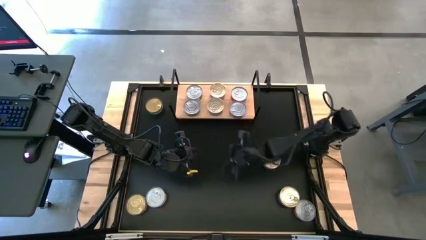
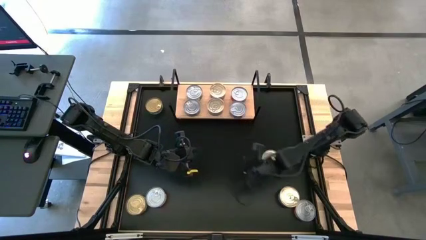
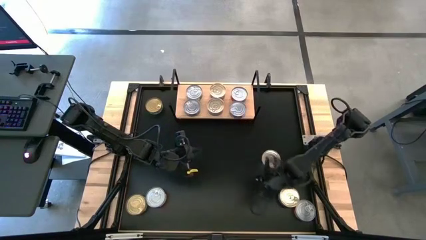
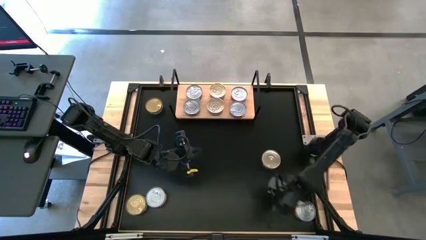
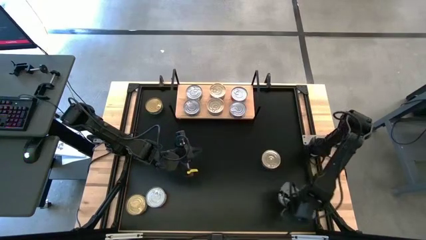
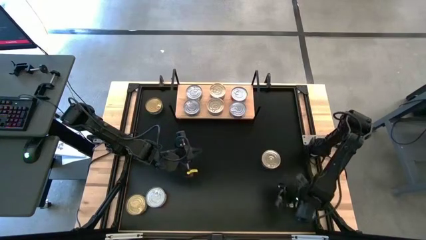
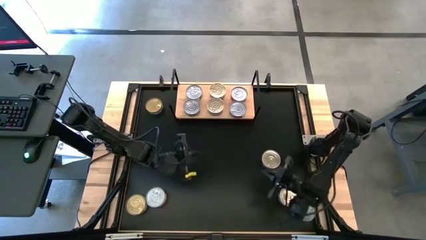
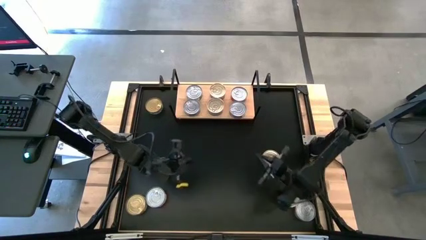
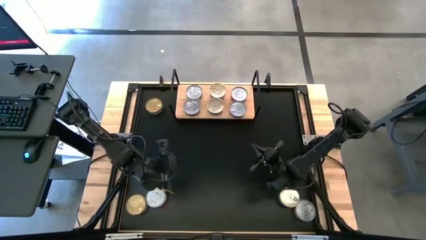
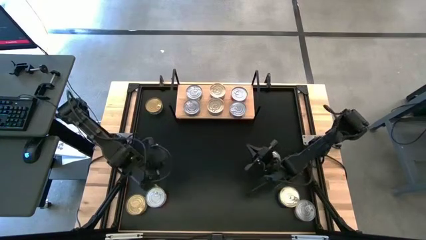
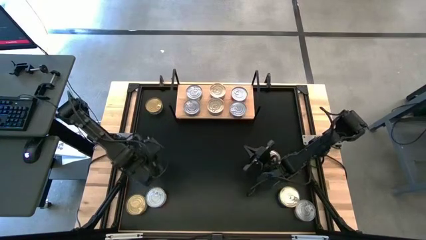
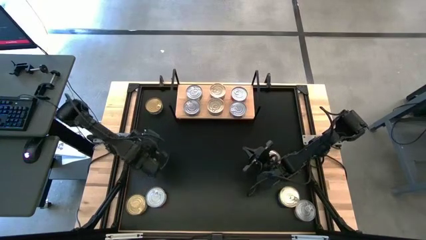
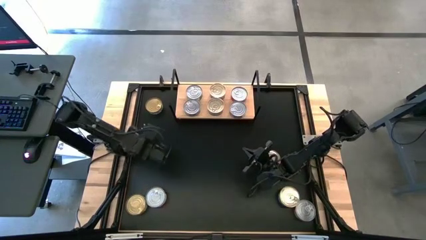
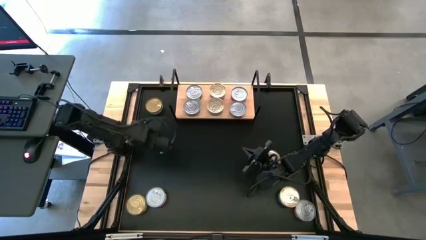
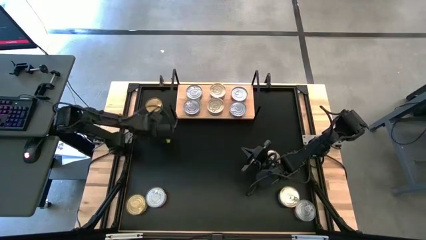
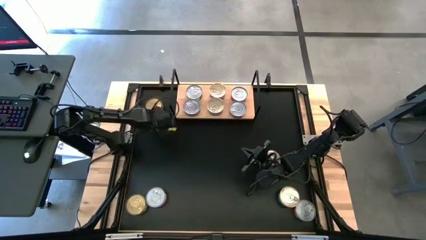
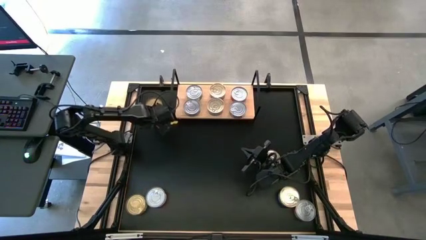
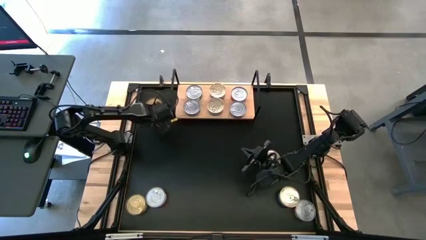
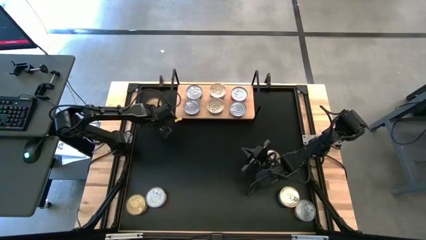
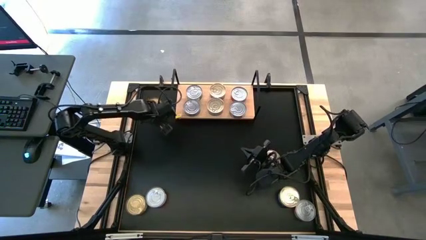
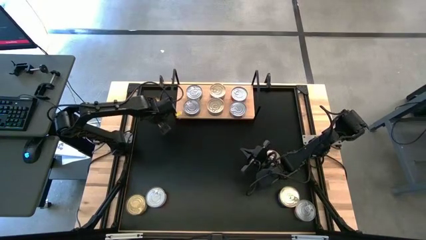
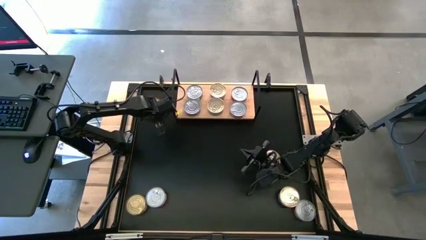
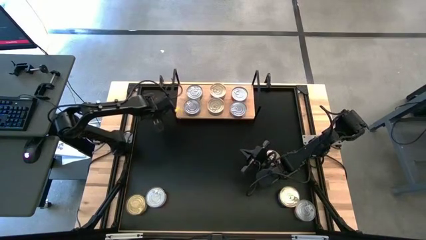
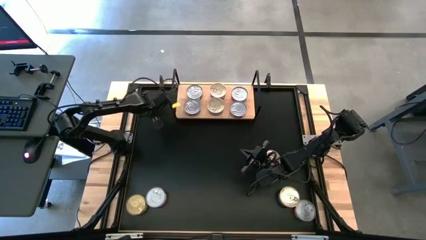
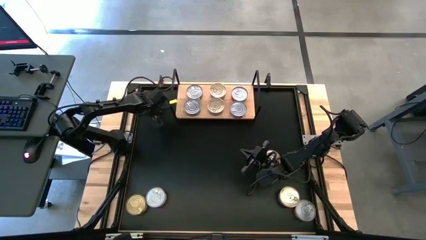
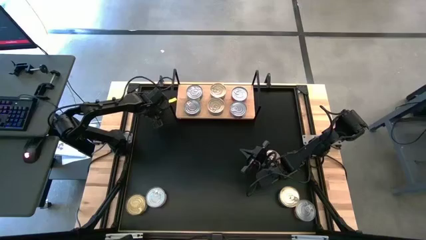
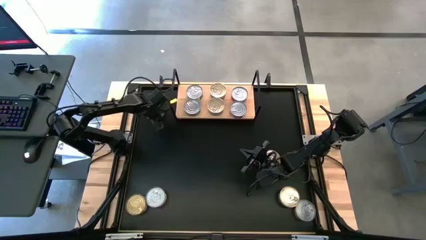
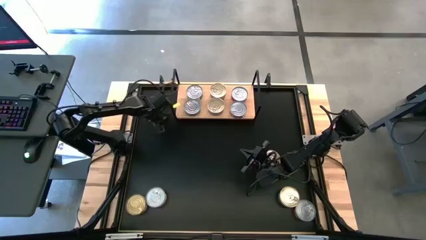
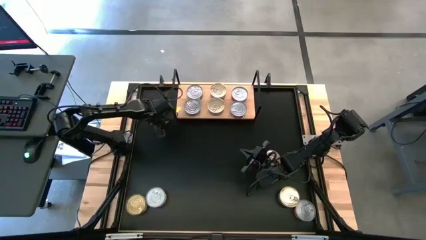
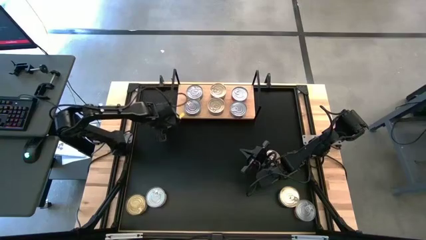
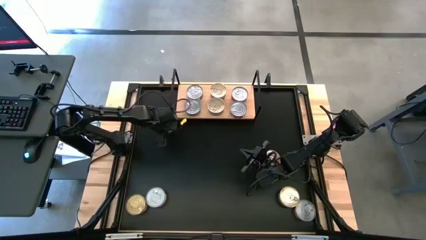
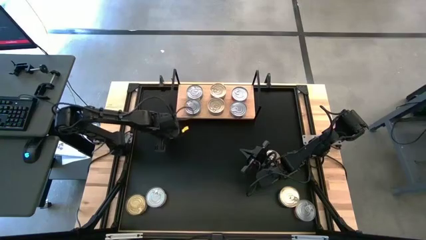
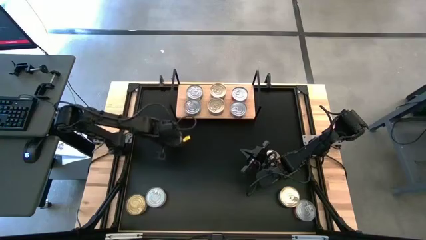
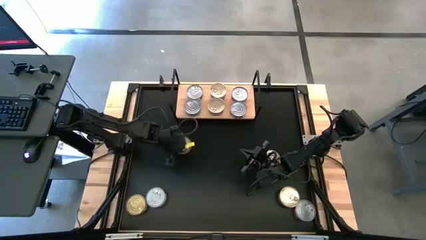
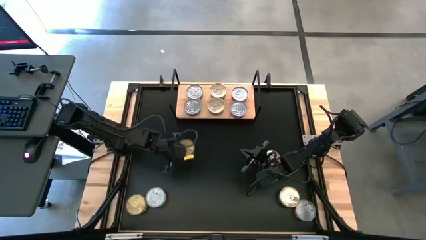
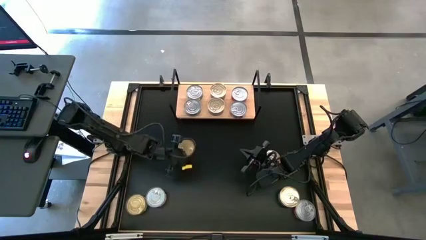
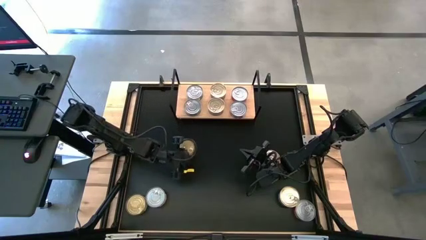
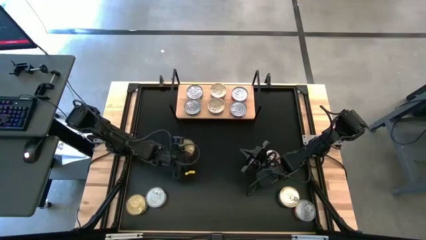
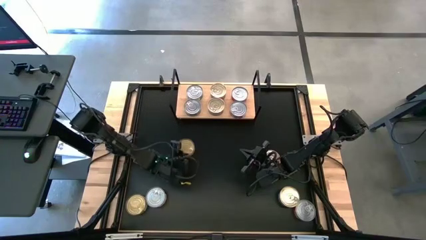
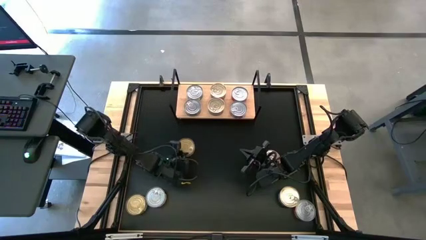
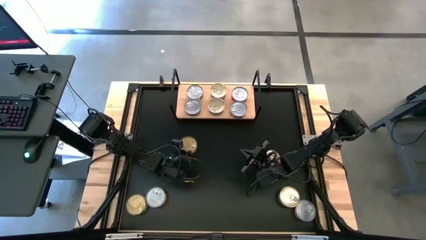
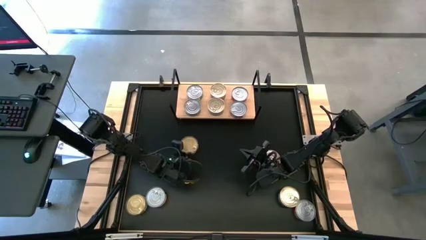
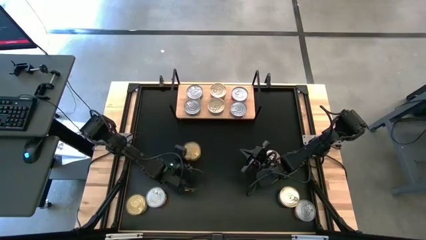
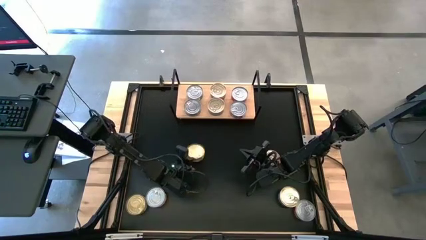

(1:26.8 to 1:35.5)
Task: Stack canned seafood by type on shelf
Stack the green tuna can on top of the green tuna can on the shelf

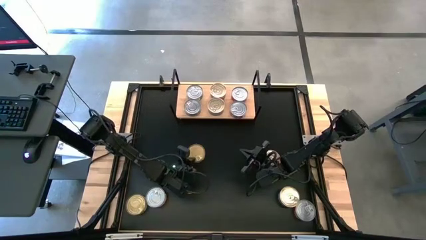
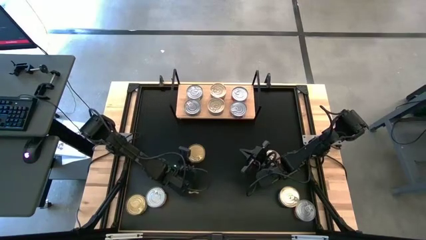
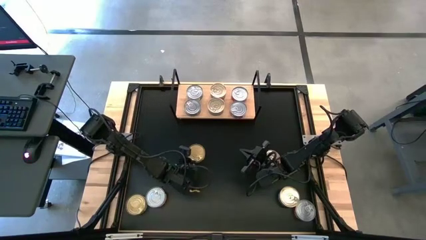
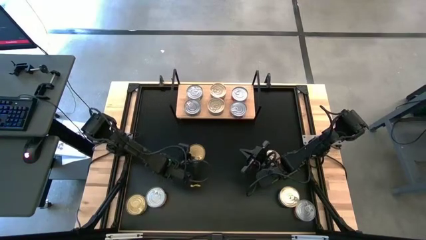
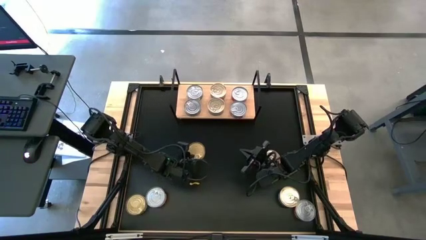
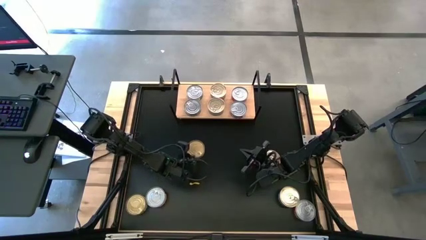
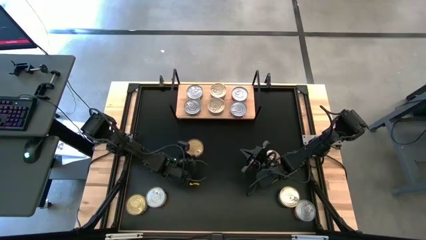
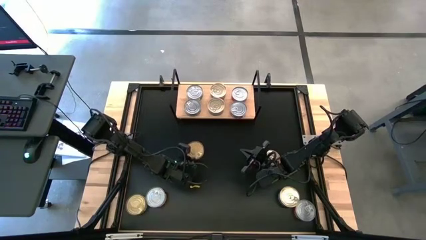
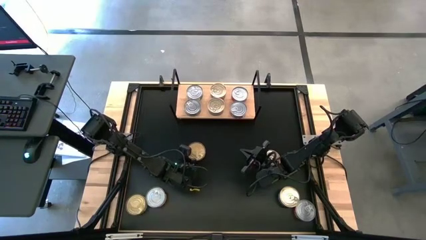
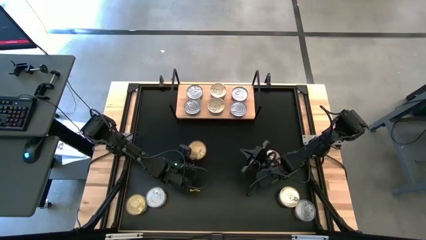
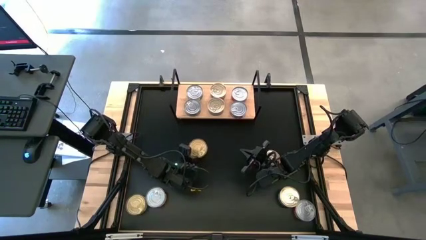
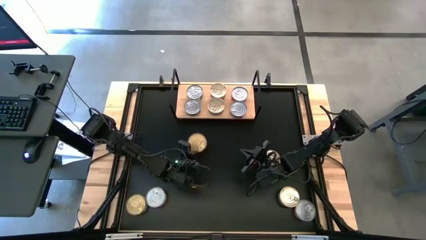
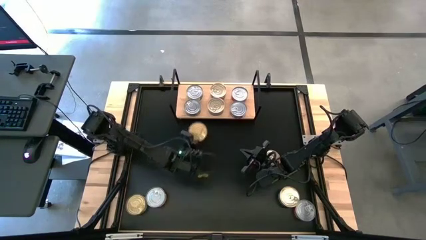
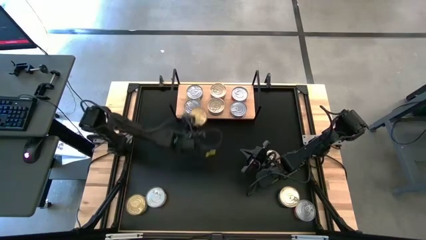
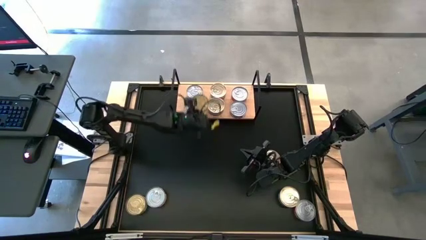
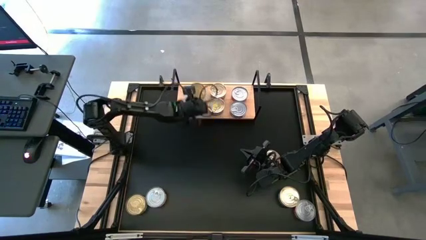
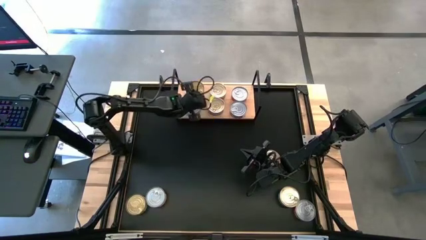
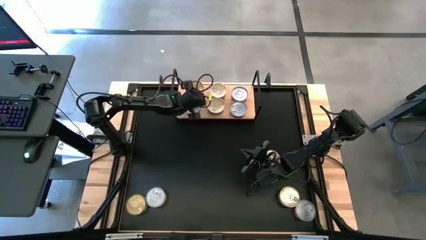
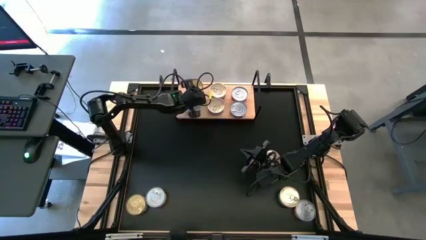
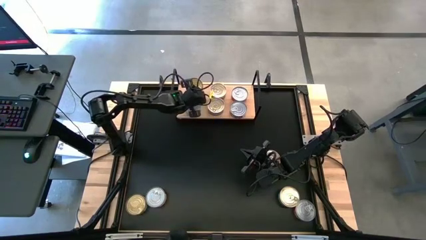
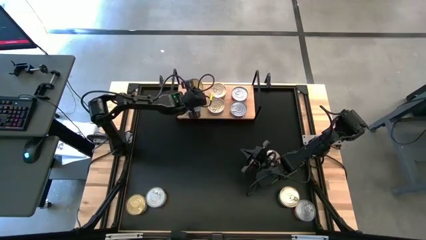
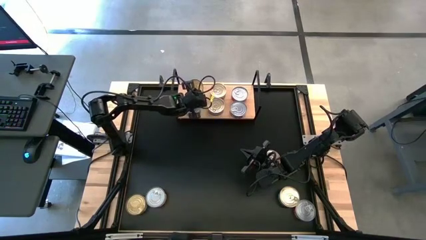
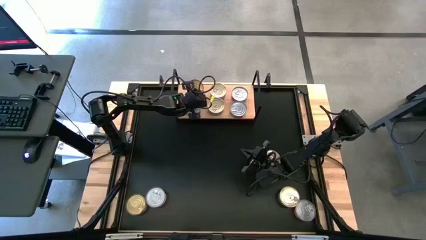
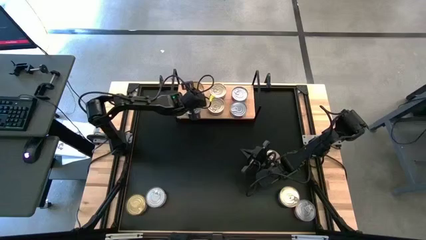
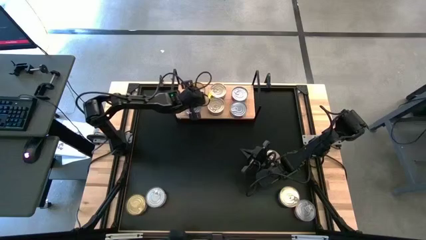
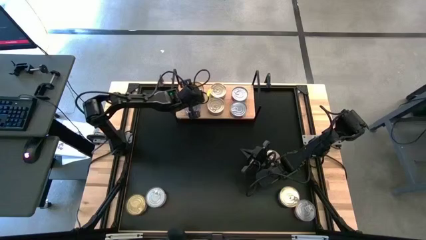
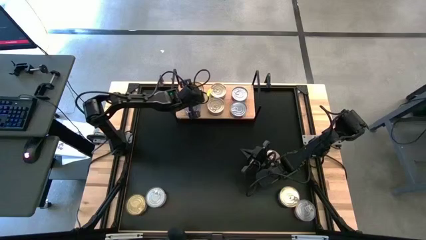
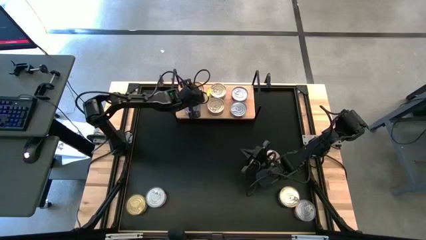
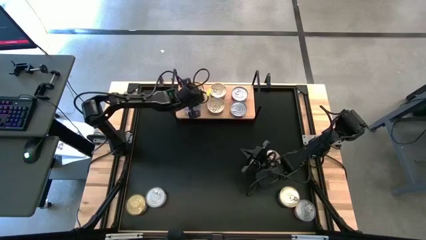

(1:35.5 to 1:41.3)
Stack the green tuna can on top of the green tuna can on the shelf

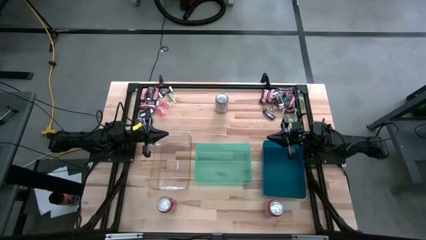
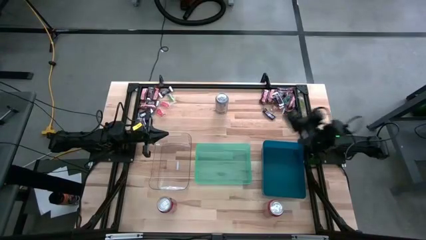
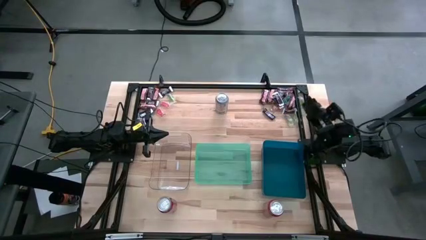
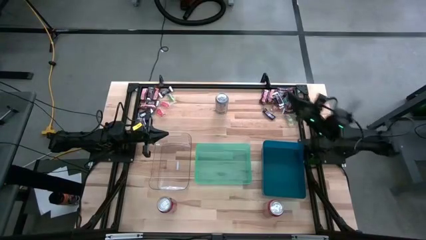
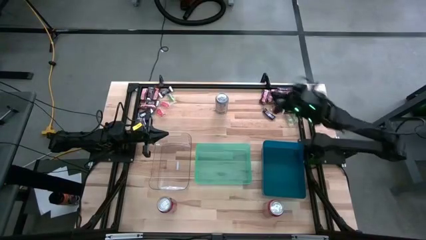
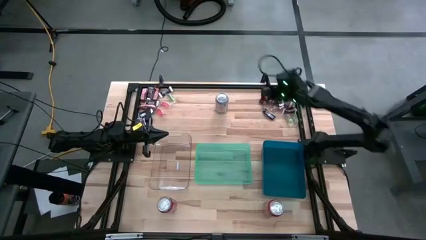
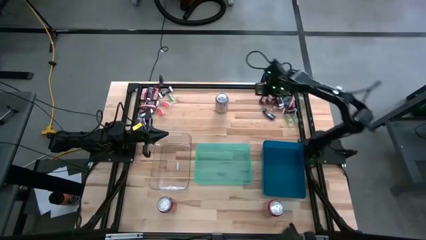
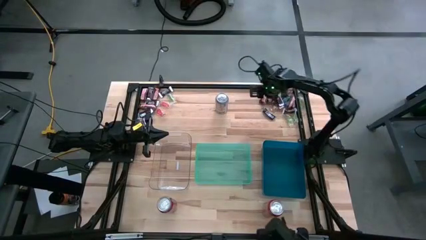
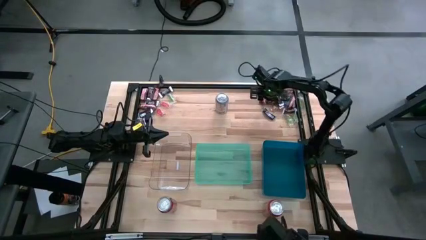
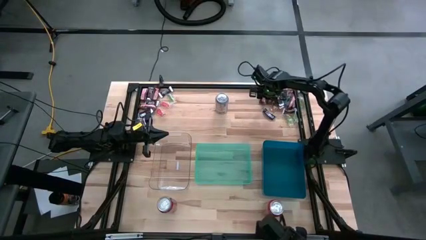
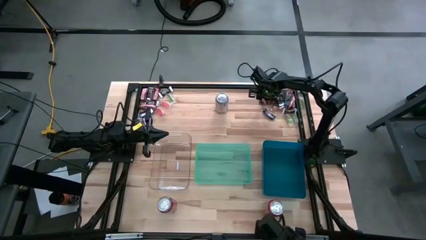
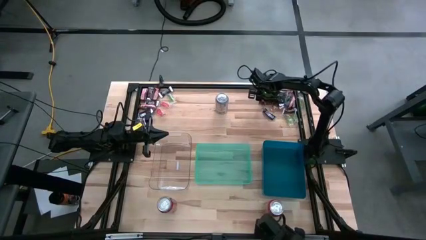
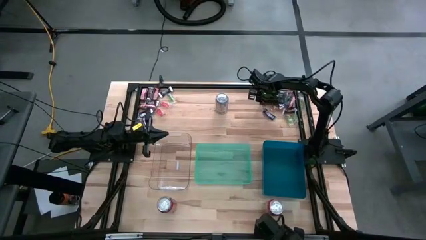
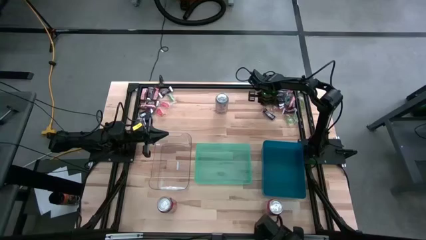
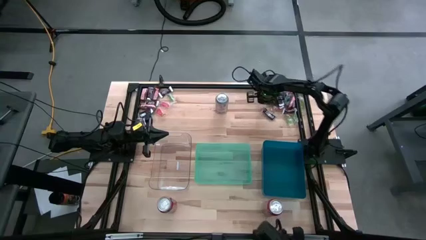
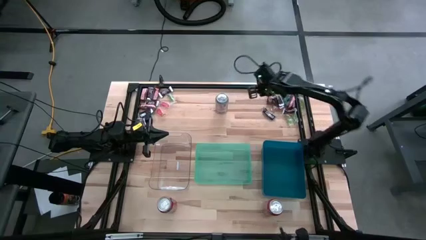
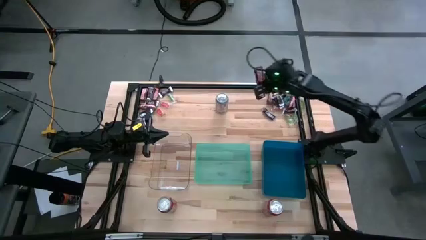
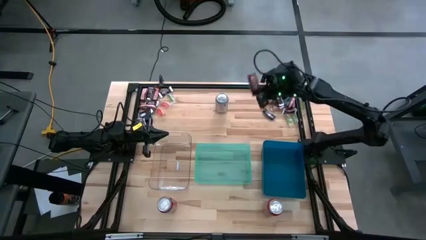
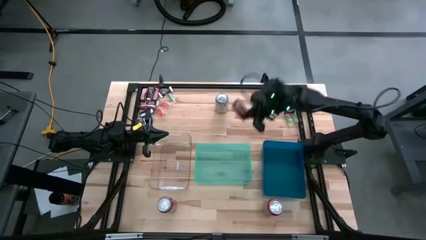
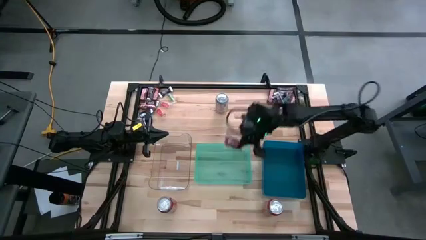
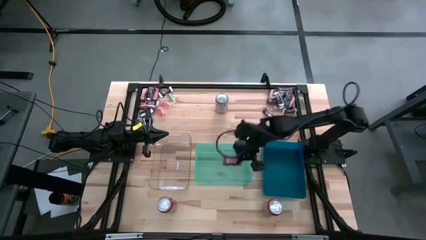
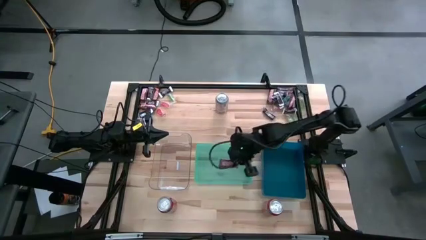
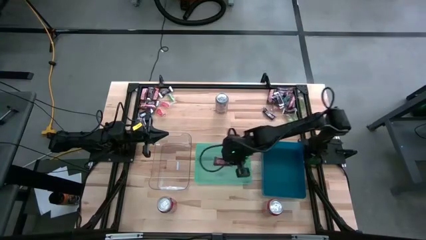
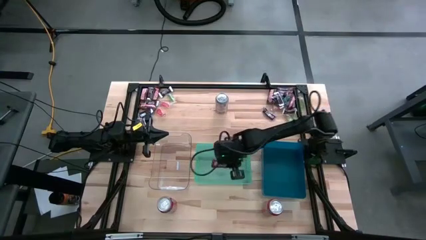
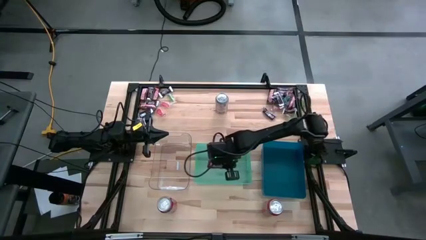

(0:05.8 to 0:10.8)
Task: Organize candy in baskets
Put the brown chocolate bar into the green bin
